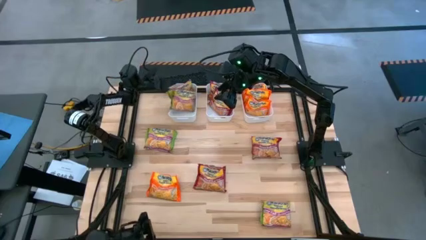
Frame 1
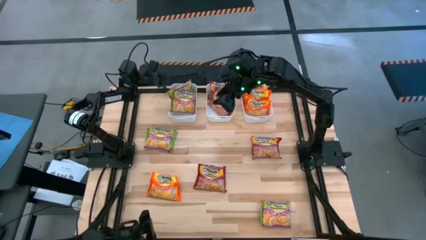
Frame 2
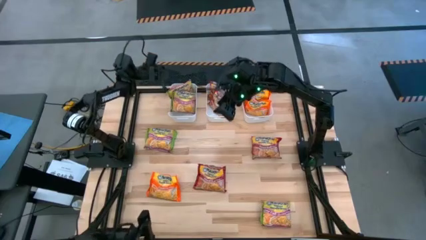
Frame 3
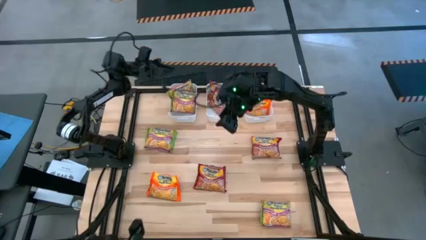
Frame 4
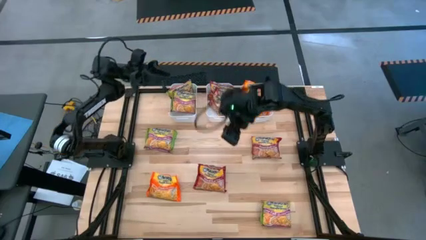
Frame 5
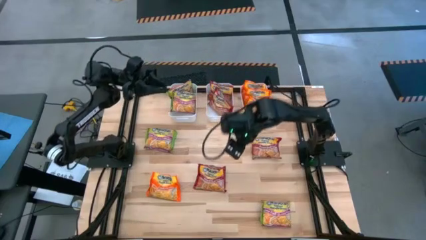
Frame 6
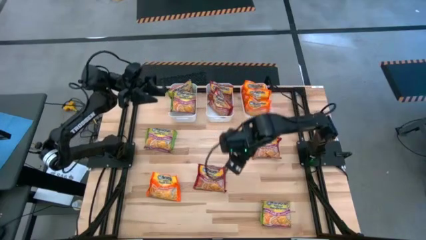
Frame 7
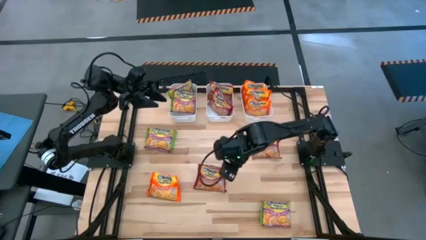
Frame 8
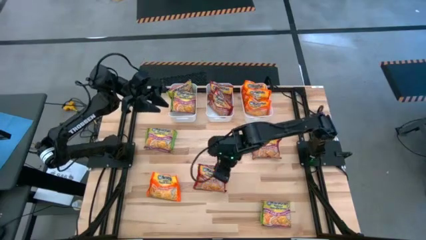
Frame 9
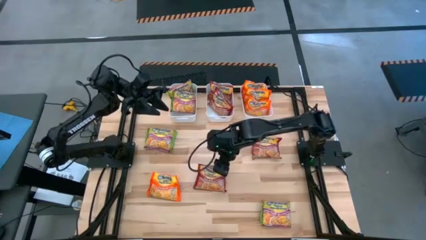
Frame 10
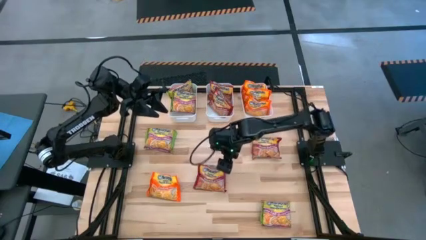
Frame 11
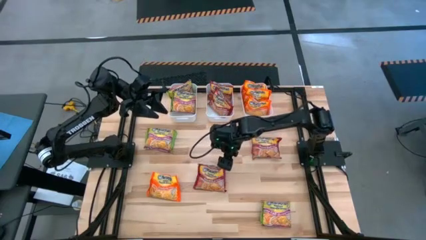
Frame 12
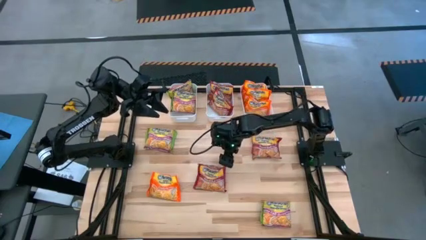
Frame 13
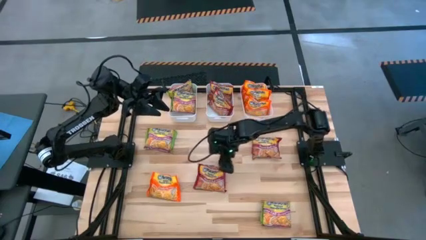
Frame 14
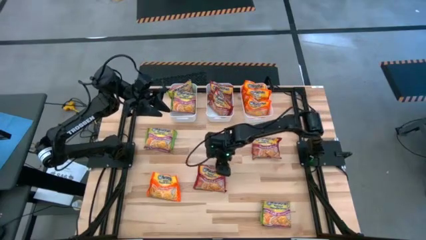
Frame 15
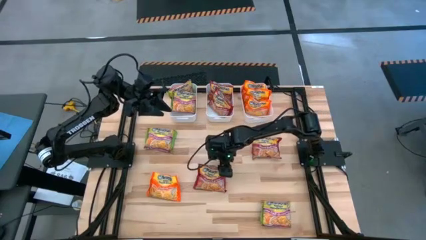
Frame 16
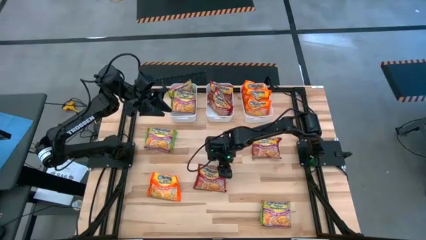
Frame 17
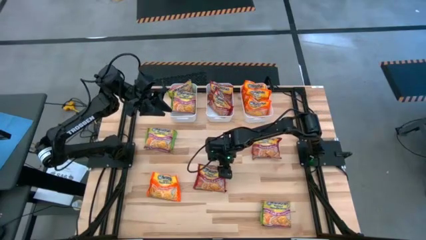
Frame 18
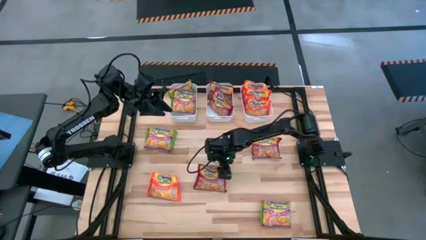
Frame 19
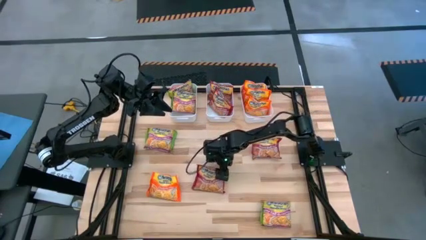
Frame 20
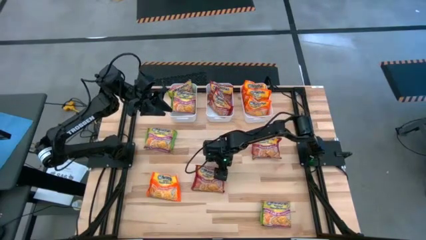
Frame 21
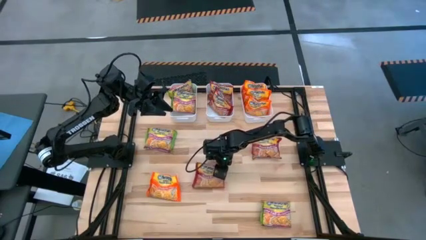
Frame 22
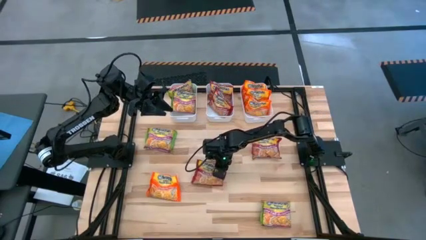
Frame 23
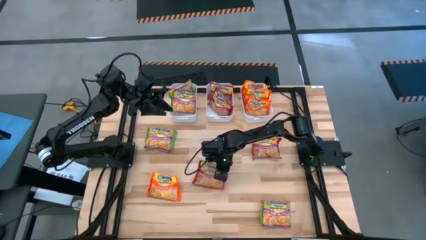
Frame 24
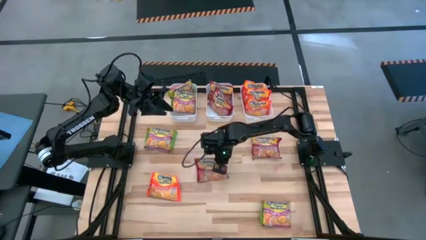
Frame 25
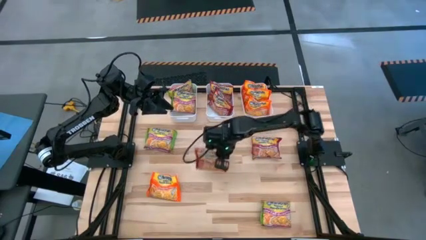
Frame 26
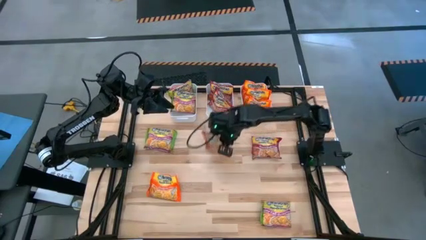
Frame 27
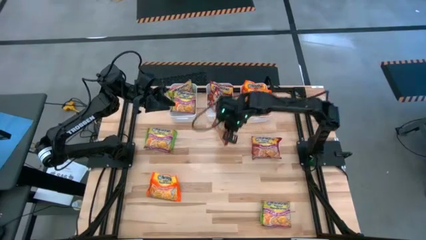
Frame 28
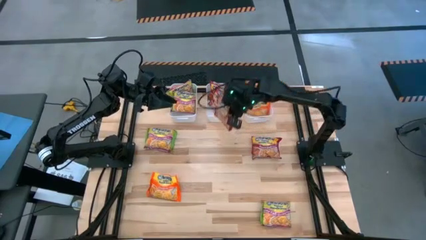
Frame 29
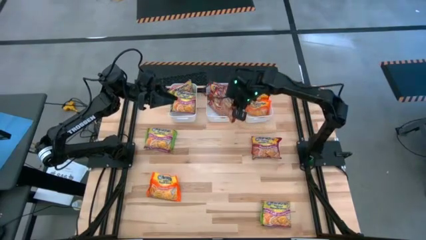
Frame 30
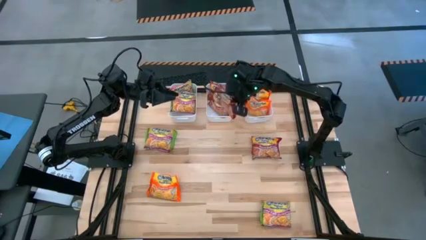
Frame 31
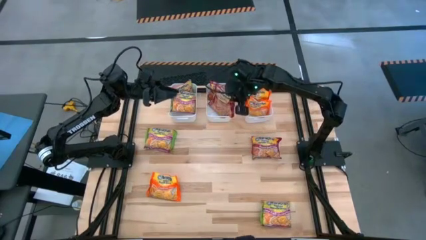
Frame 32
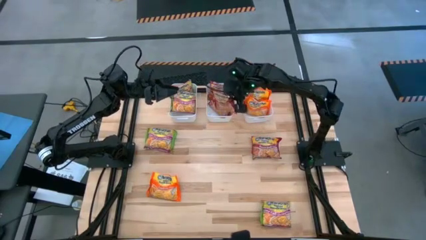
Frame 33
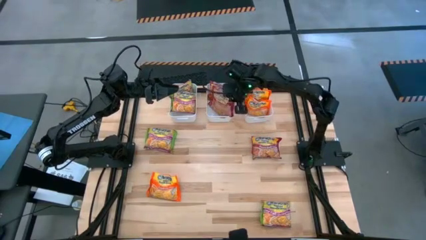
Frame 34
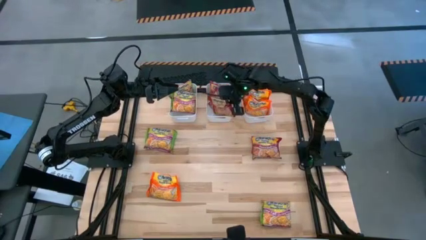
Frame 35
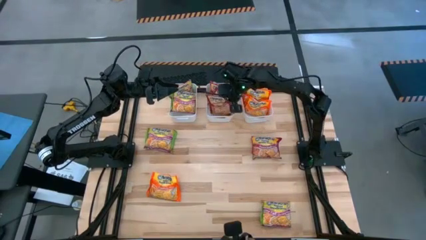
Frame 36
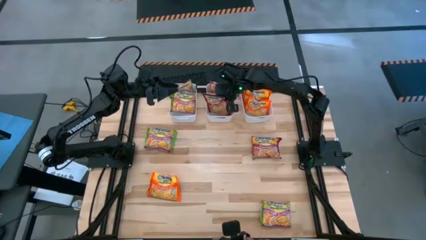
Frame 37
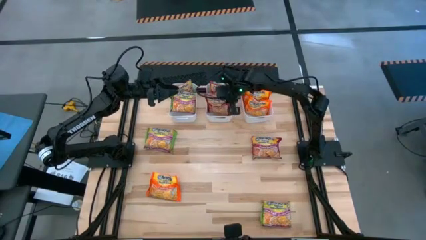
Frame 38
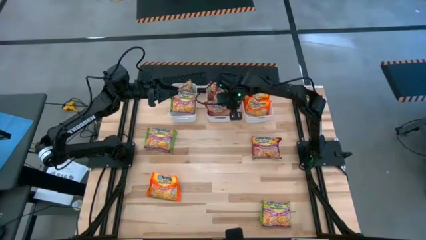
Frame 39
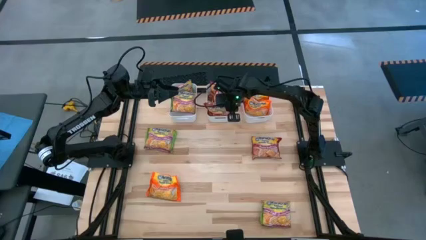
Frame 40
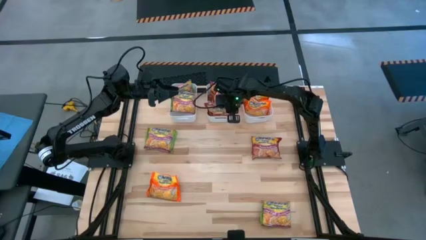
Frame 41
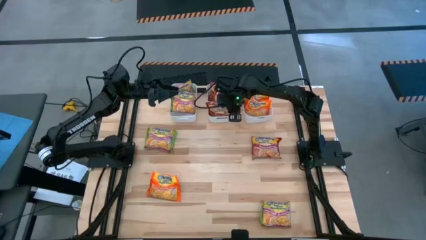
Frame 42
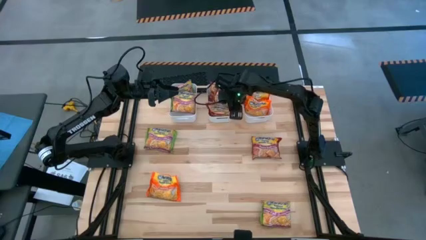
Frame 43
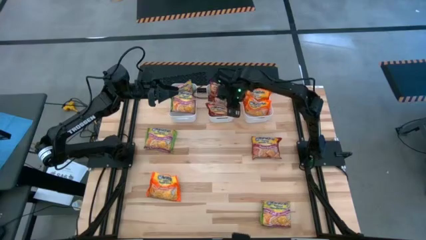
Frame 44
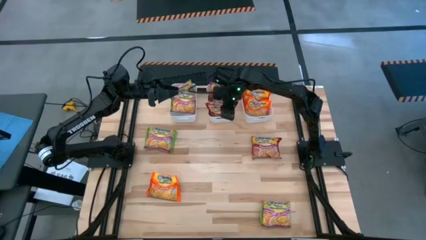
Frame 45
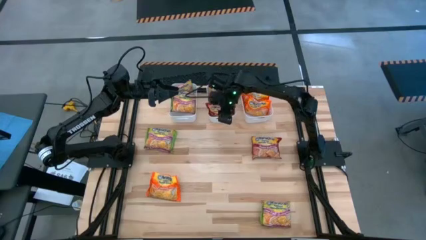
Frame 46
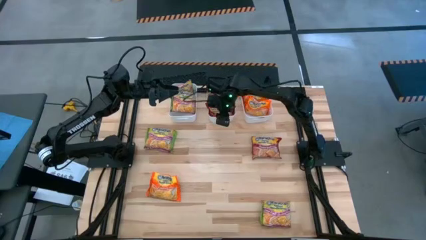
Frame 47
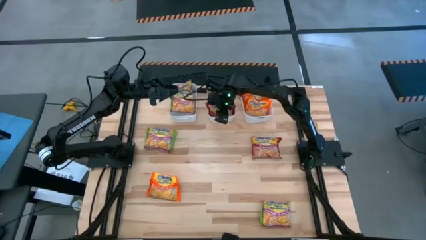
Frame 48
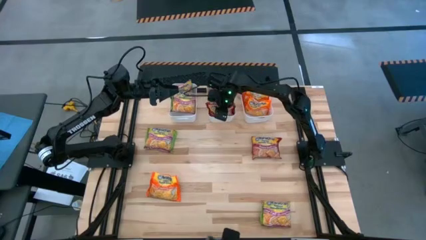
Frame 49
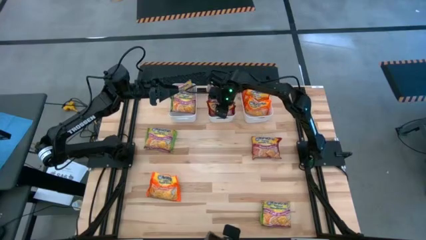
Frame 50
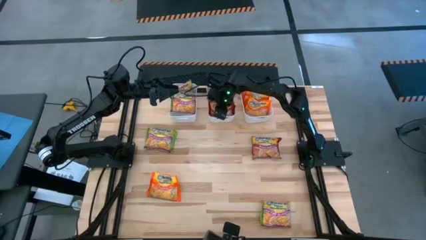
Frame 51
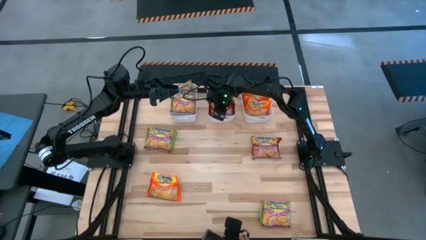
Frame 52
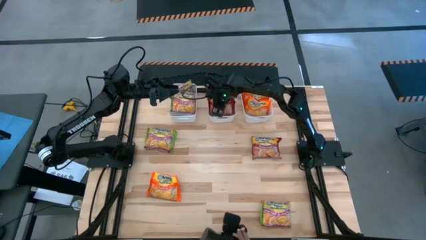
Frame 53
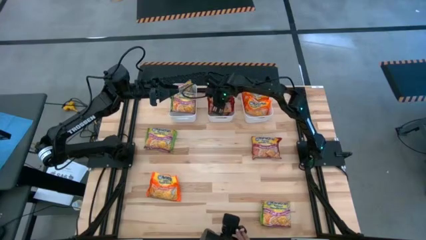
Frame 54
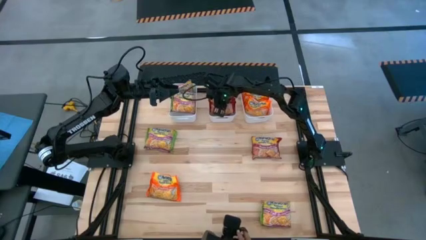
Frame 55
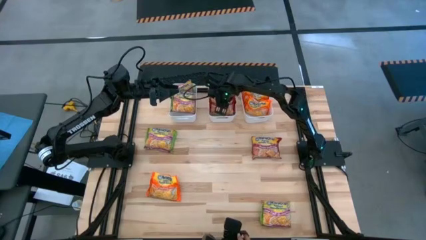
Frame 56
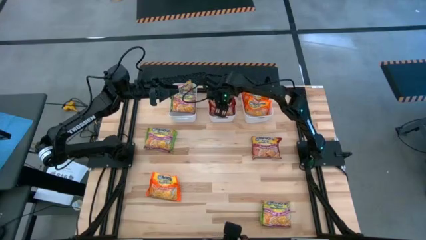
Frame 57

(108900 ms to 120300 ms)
Task: Sort Maruchan noodles
Put the red noodle pack into the center white bin

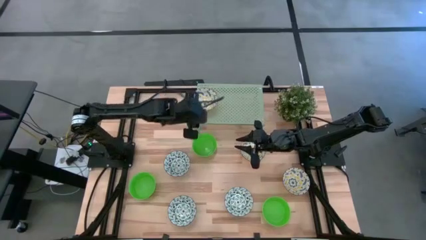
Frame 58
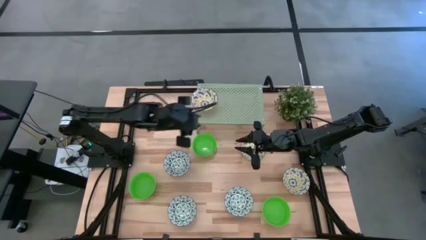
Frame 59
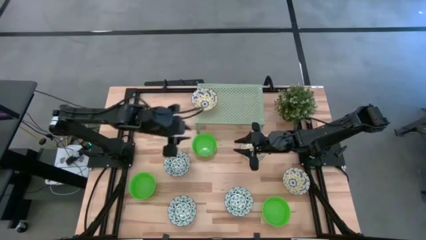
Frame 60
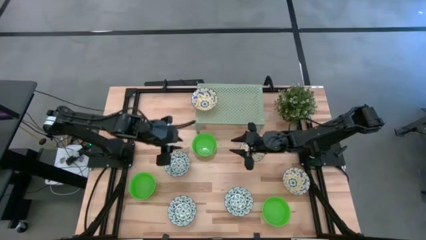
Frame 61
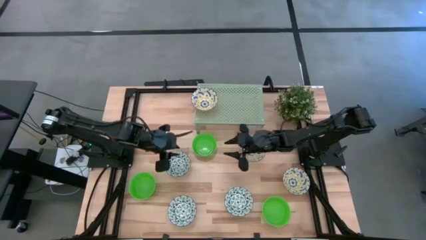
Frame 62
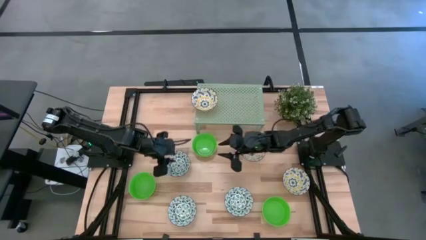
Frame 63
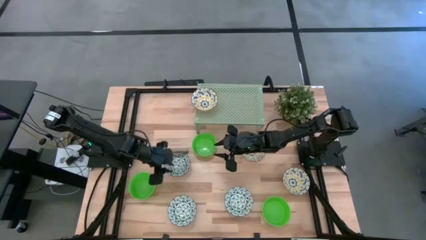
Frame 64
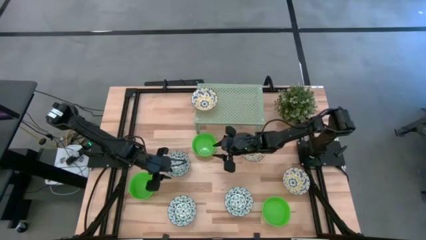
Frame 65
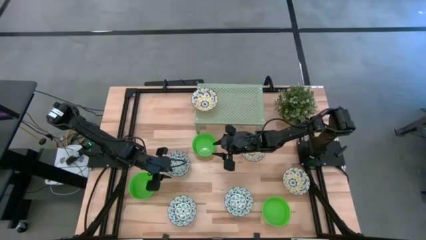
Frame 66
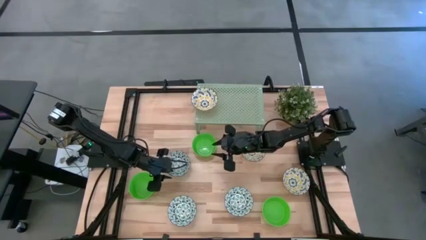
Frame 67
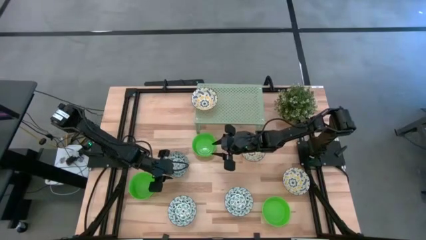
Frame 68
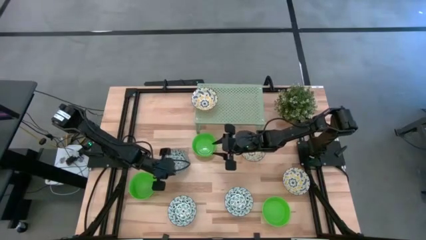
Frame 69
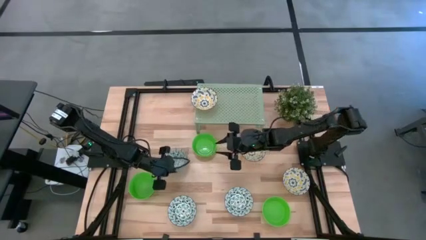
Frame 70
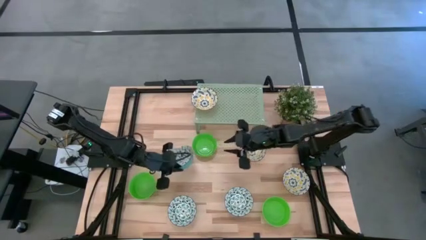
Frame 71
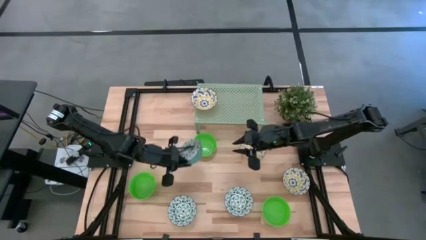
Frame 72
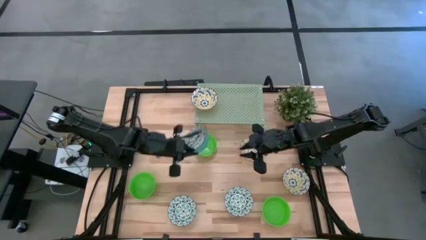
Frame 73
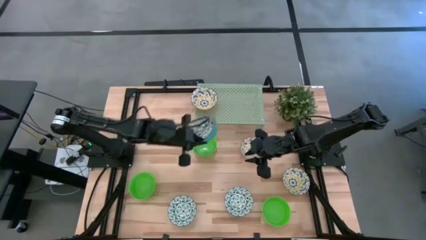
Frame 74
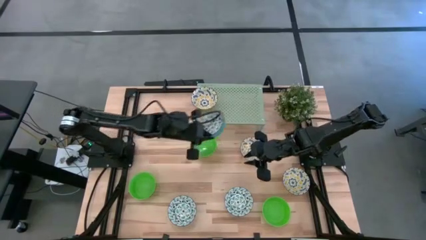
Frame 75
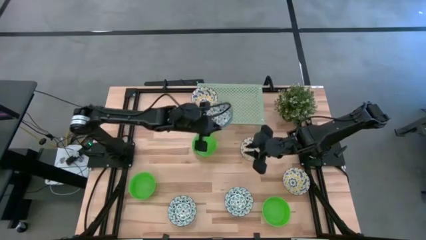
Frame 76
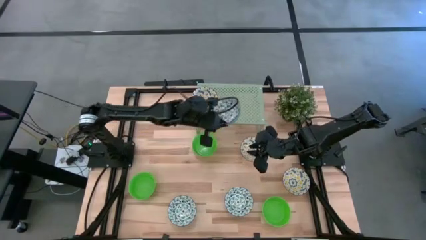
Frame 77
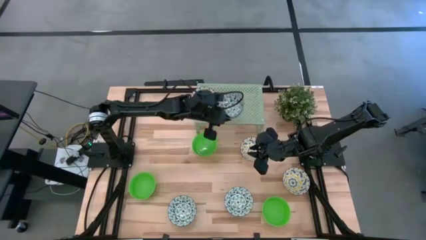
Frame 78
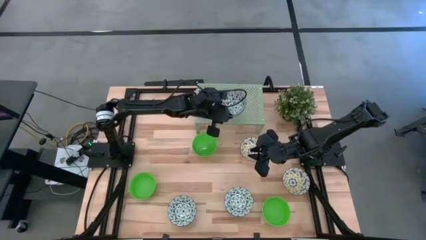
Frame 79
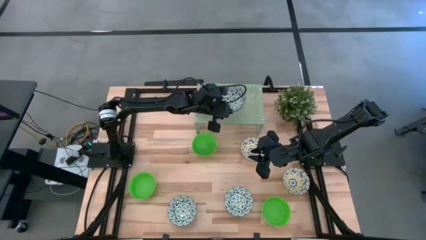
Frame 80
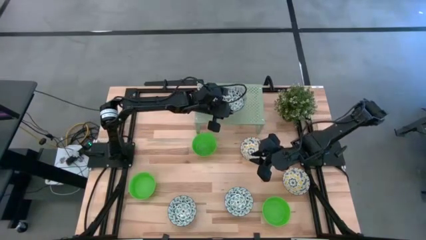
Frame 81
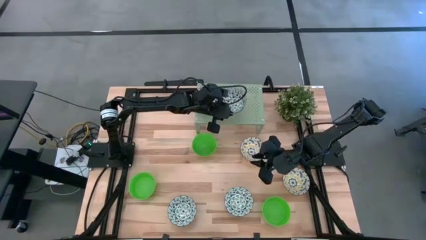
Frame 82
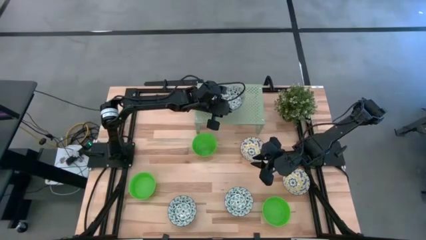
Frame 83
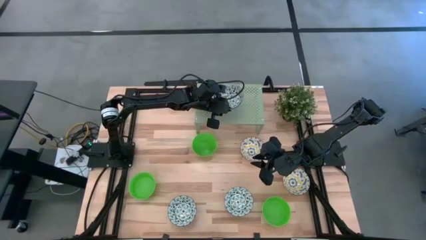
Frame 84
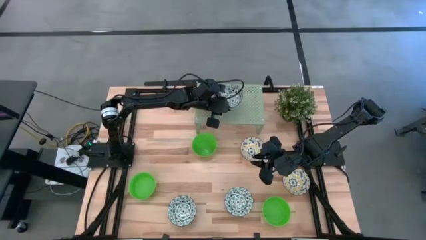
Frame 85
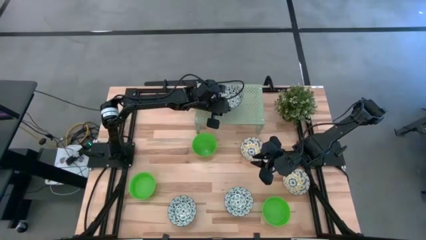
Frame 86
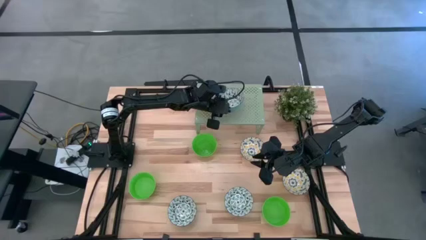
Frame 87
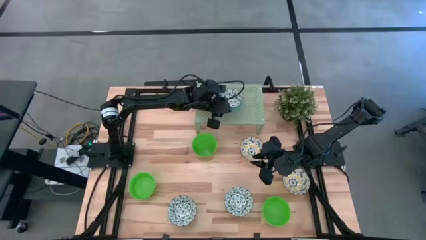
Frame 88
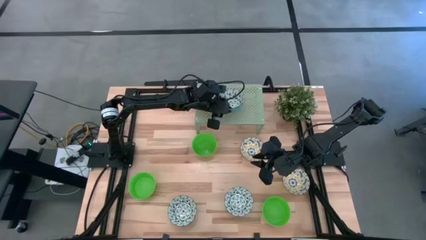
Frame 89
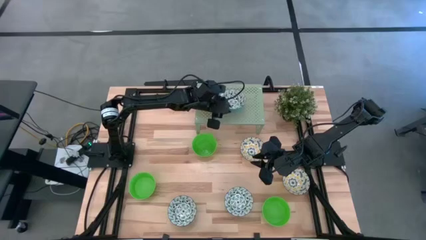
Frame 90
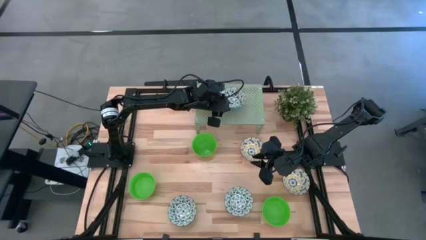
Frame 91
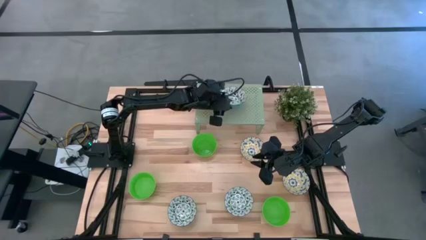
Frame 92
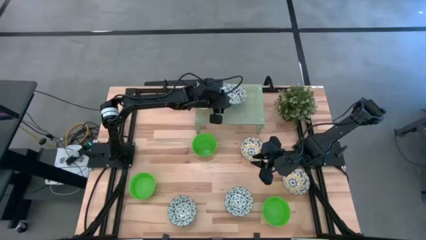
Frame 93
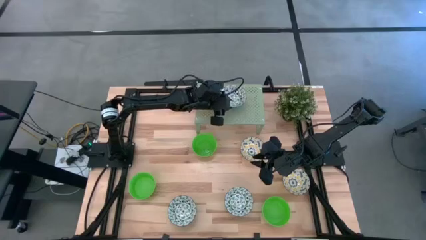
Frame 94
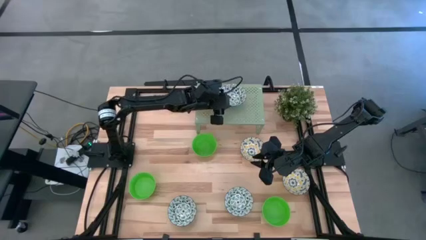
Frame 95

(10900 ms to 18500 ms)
Task: Pick & Place Mini bowls
Put the top green patterned bowl on the shelf
